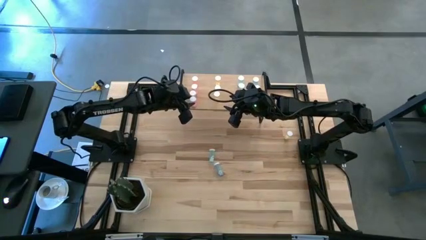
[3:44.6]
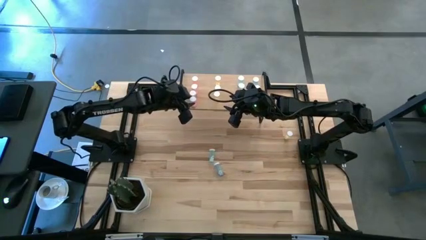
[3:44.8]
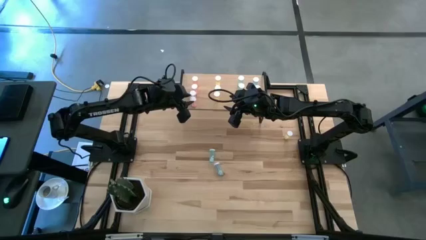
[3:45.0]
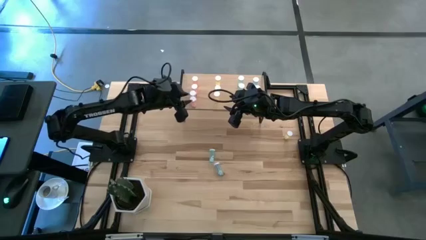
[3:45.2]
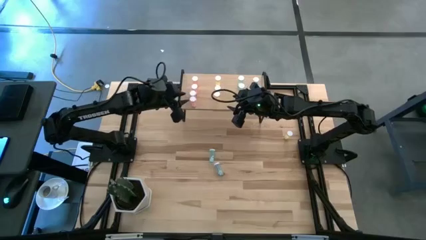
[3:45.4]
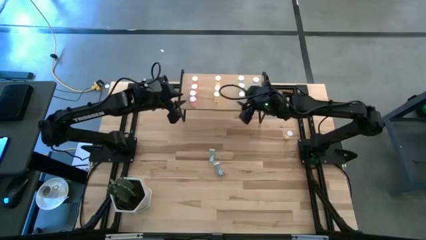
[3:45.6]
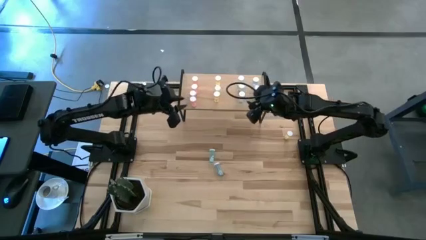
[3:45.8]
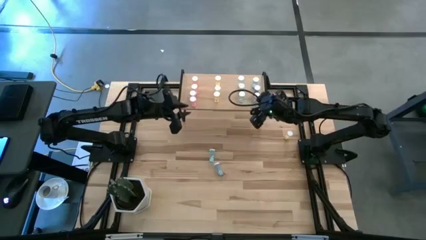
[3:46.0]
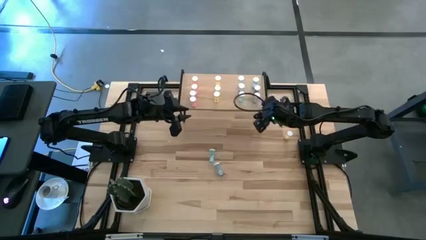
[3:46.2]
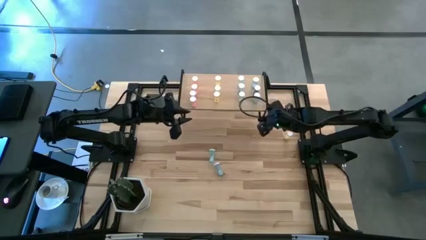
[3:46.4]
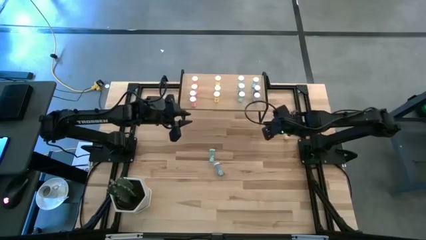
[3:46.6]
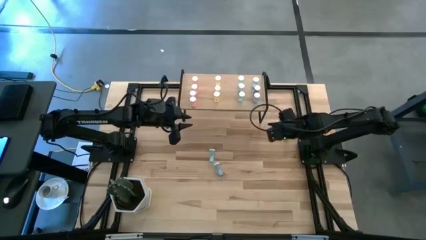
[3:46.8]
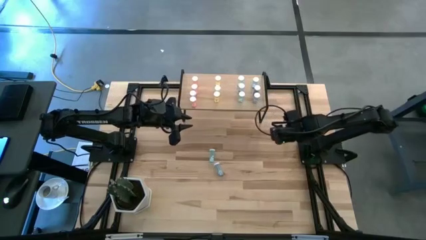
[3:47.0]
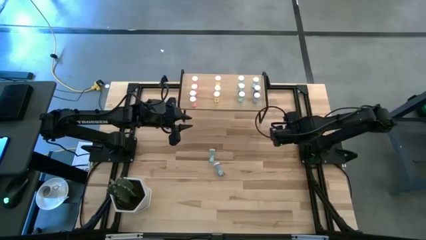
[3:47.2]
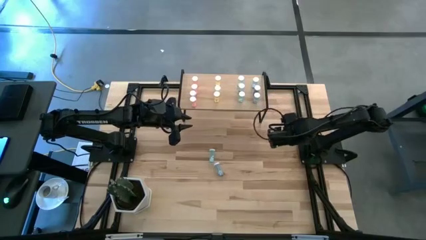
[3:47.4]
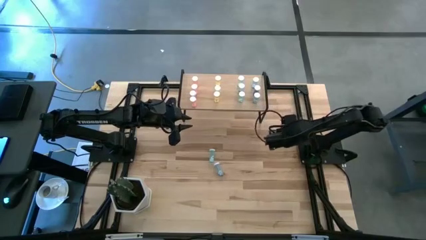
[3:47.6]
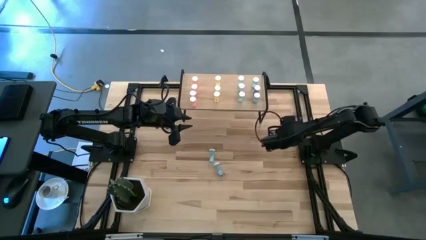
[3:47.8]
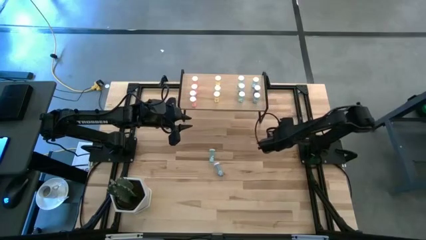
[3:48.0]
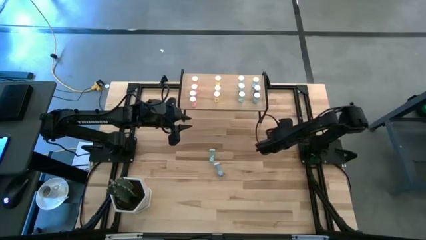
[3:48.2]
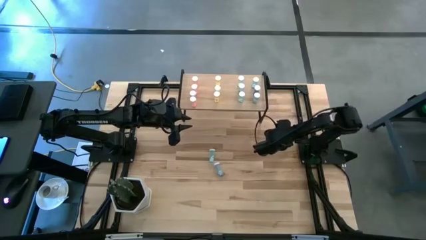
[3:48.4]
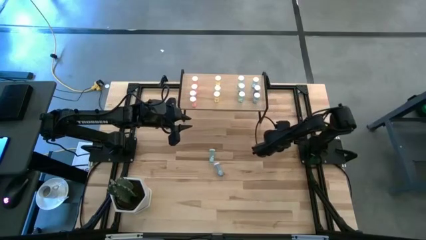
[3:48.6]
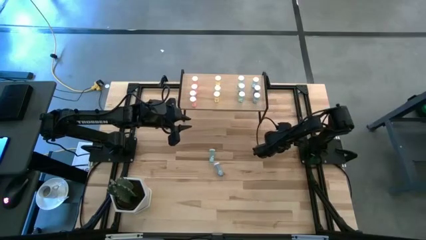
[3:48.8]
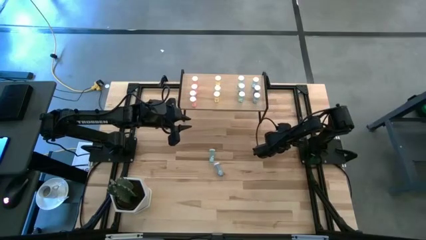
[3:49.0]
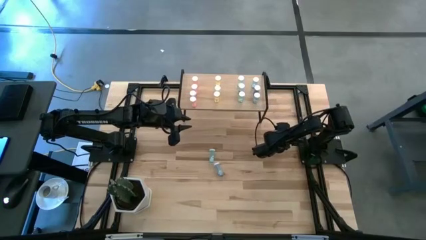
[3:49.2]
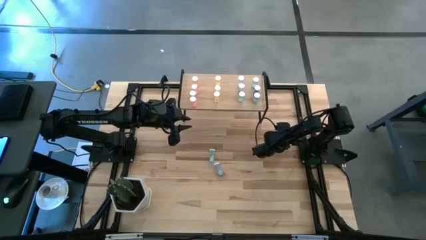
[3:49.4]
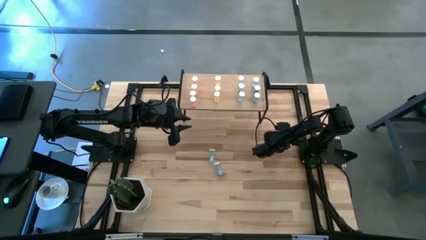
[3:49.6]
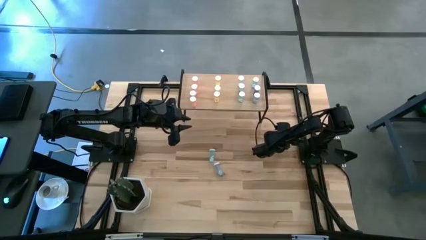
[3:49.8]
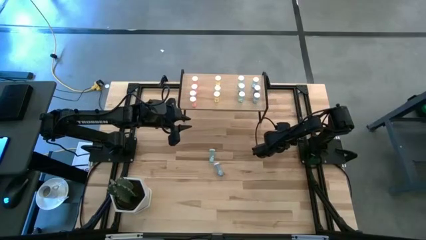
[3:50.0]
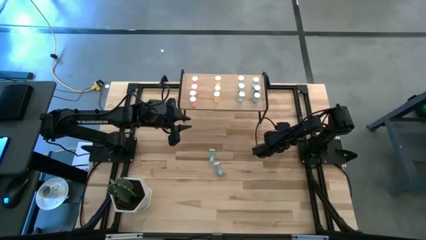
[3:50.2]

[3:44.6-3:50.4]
Task: Pick and place medicine bottles onto shelf by color
Put the yellow pill bottle on the shelf aligned with the other yellow pill bottles

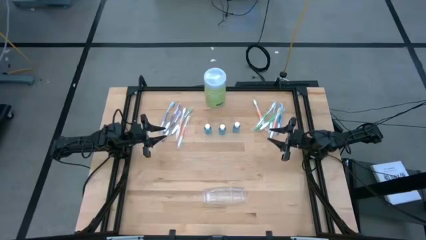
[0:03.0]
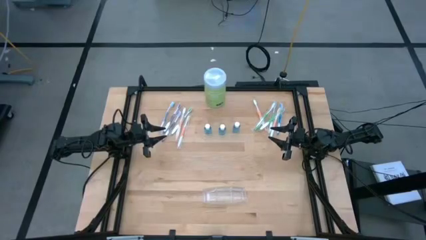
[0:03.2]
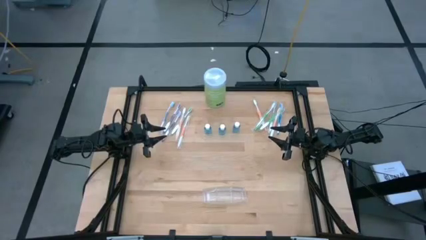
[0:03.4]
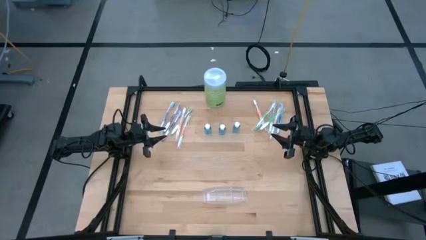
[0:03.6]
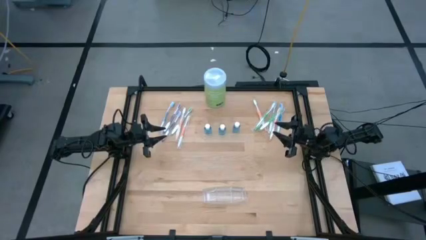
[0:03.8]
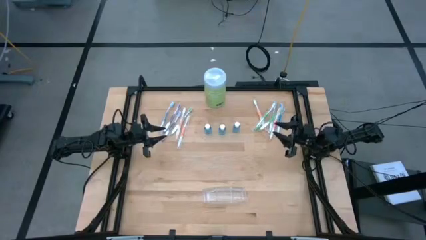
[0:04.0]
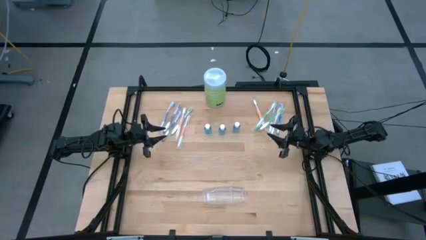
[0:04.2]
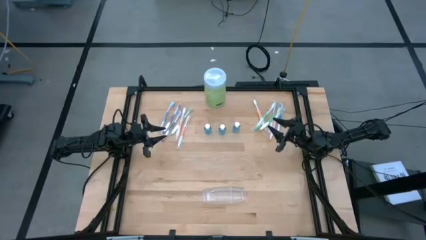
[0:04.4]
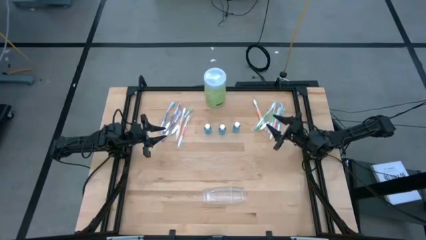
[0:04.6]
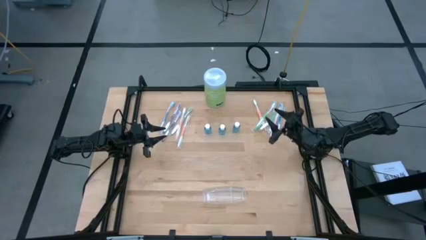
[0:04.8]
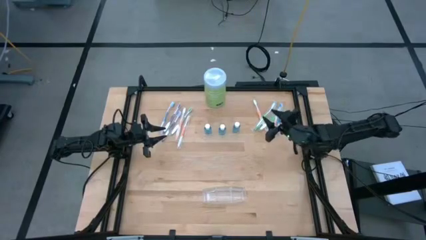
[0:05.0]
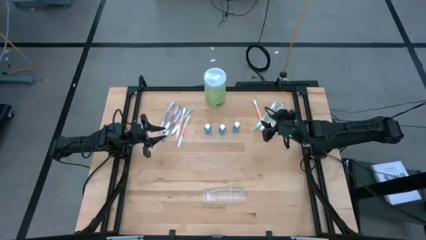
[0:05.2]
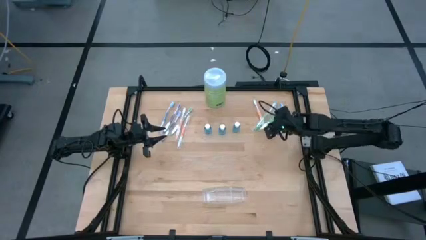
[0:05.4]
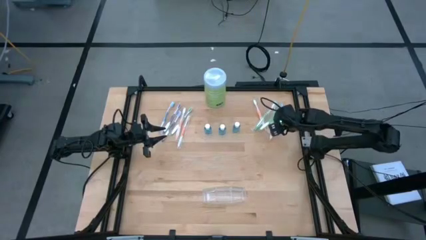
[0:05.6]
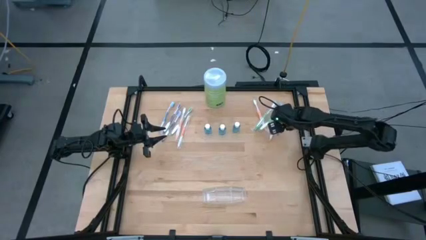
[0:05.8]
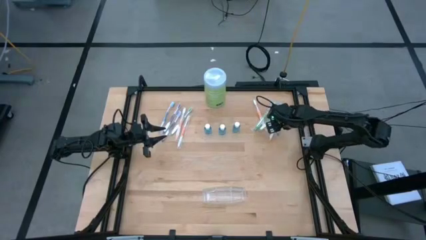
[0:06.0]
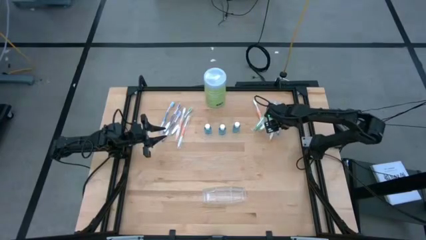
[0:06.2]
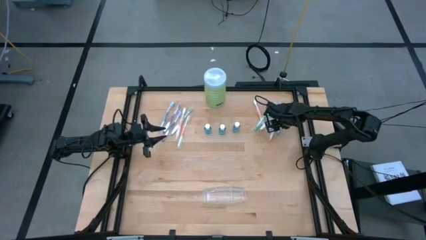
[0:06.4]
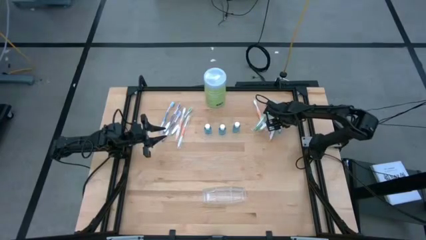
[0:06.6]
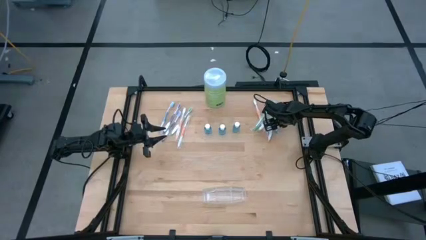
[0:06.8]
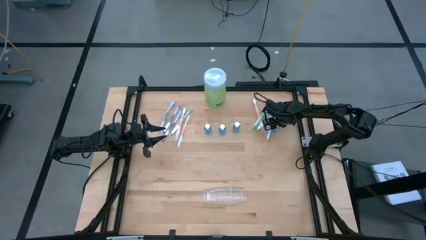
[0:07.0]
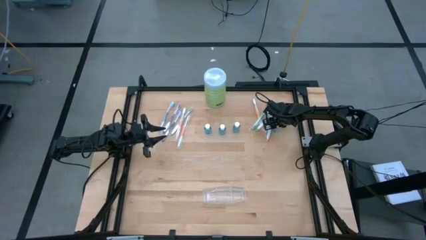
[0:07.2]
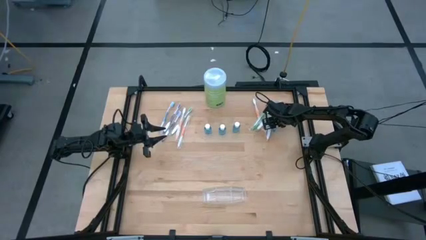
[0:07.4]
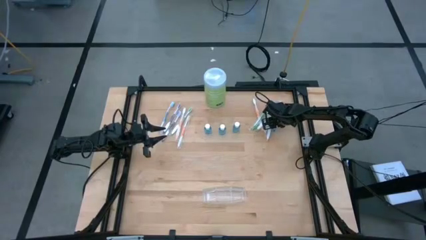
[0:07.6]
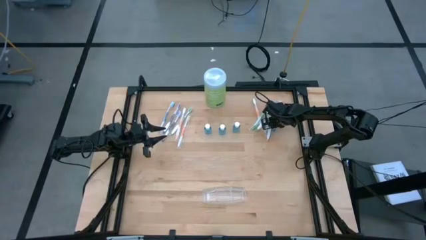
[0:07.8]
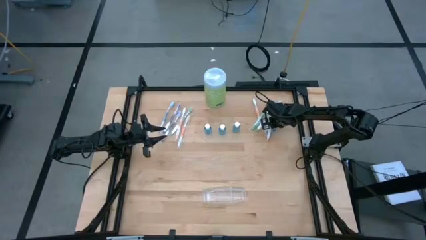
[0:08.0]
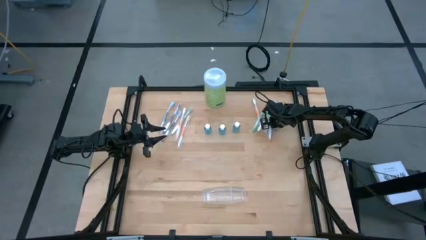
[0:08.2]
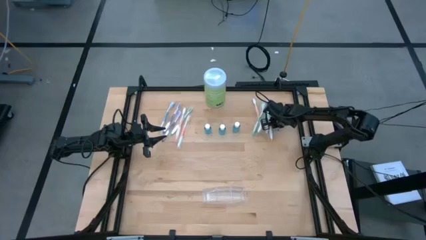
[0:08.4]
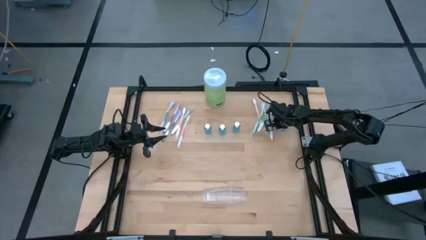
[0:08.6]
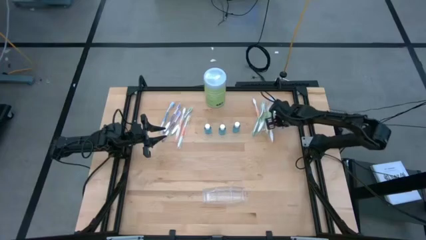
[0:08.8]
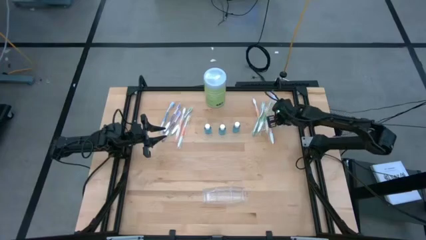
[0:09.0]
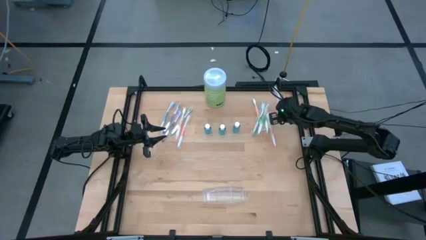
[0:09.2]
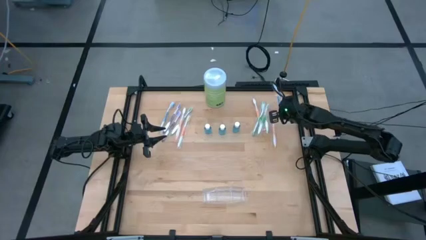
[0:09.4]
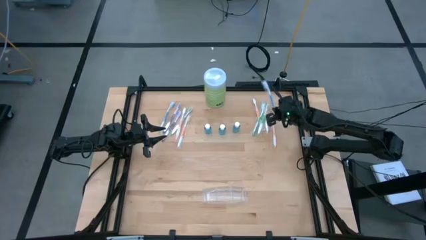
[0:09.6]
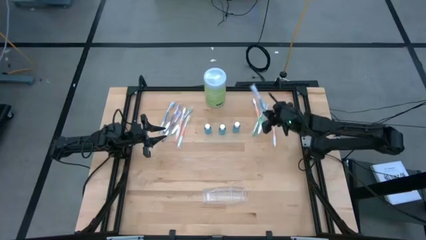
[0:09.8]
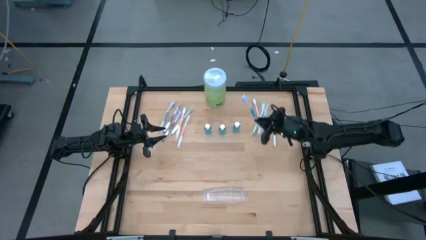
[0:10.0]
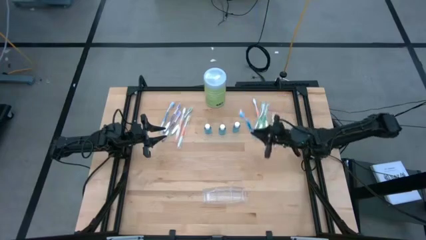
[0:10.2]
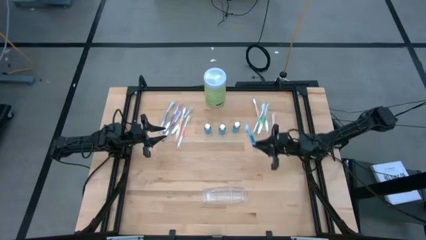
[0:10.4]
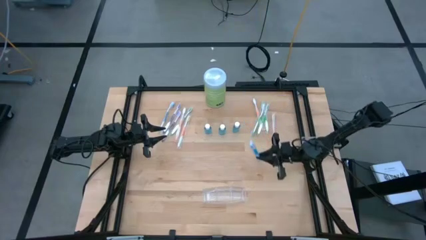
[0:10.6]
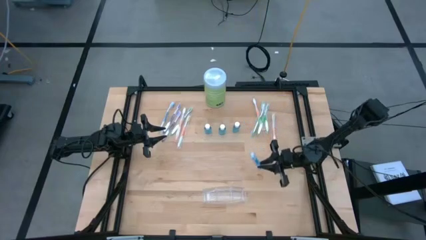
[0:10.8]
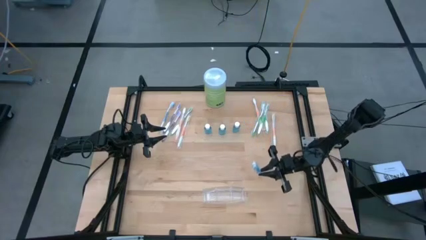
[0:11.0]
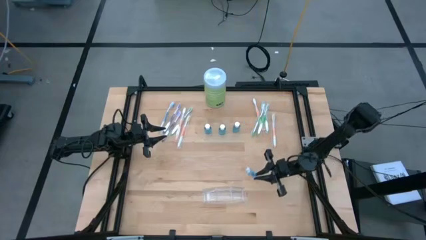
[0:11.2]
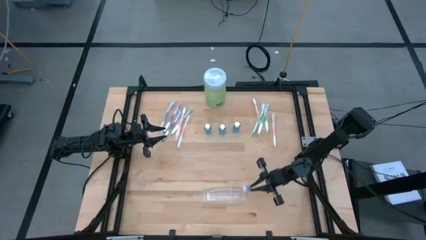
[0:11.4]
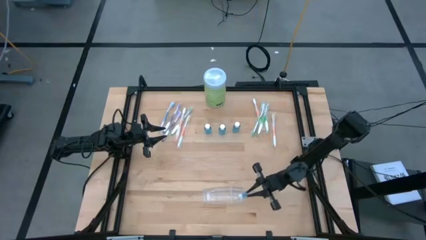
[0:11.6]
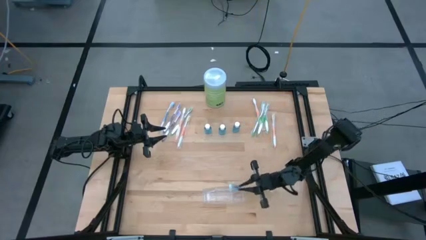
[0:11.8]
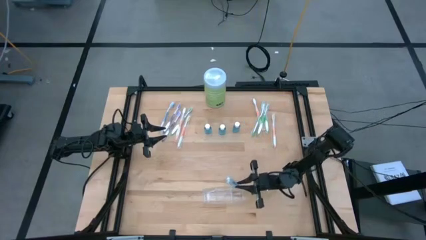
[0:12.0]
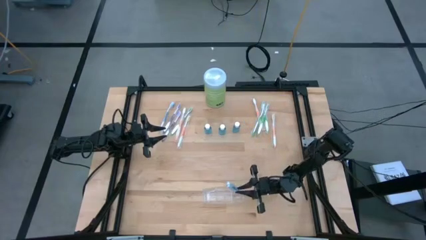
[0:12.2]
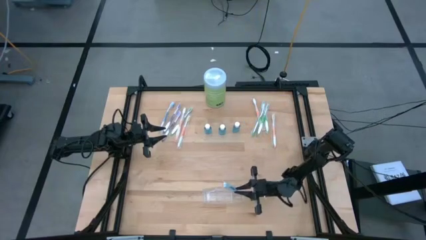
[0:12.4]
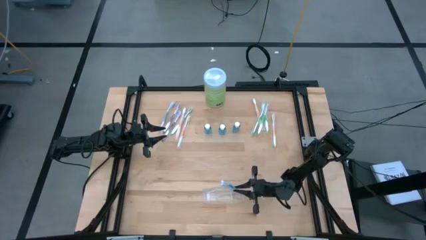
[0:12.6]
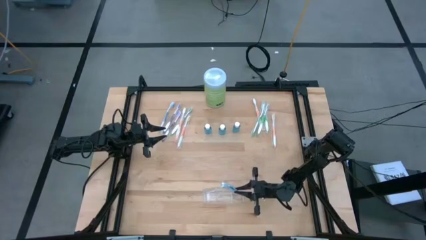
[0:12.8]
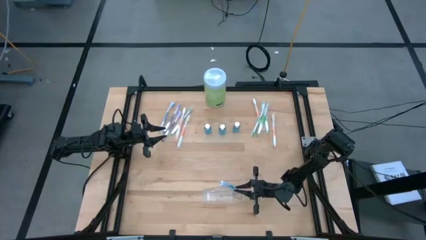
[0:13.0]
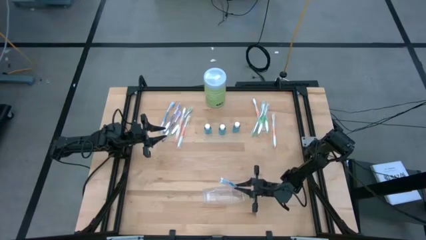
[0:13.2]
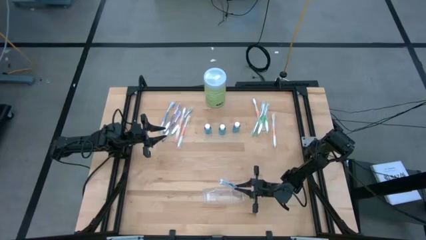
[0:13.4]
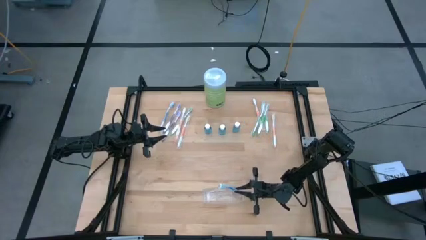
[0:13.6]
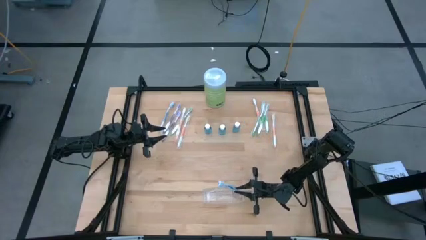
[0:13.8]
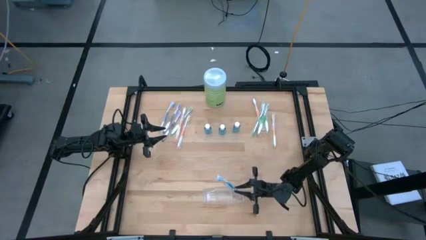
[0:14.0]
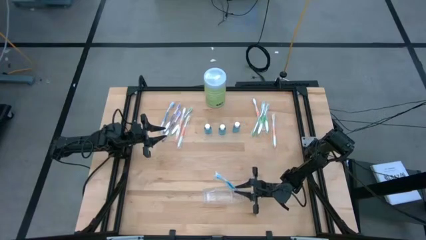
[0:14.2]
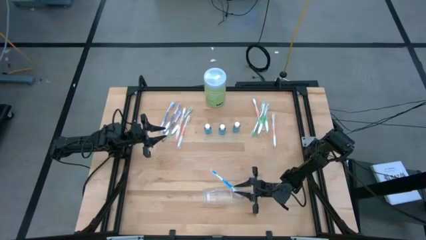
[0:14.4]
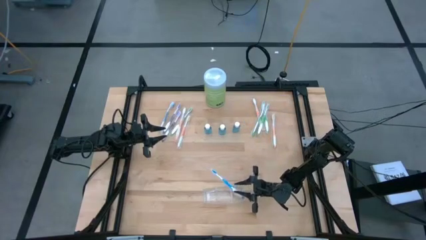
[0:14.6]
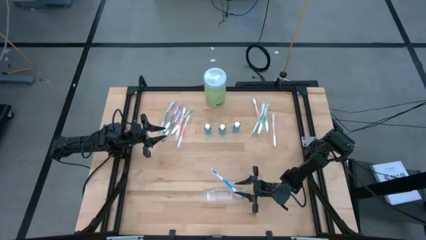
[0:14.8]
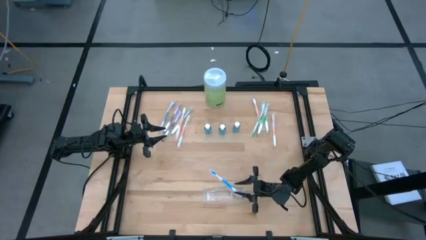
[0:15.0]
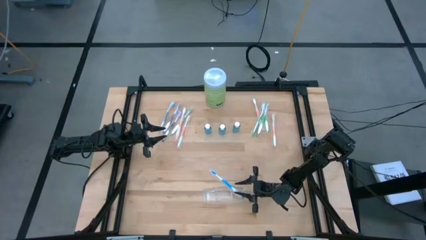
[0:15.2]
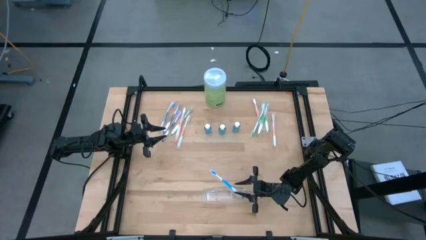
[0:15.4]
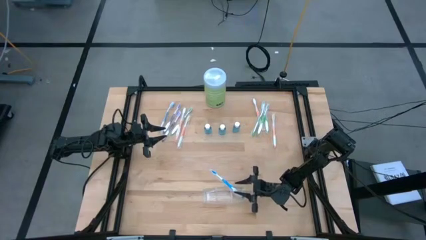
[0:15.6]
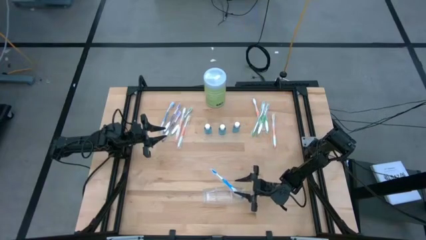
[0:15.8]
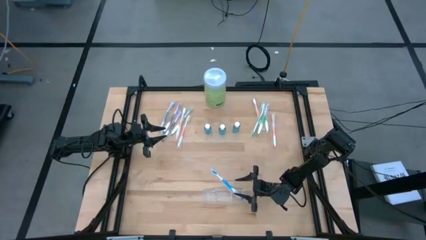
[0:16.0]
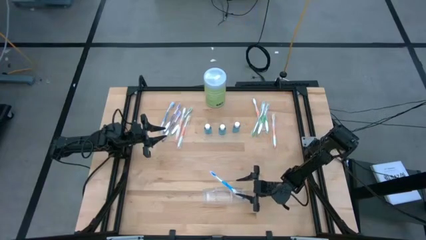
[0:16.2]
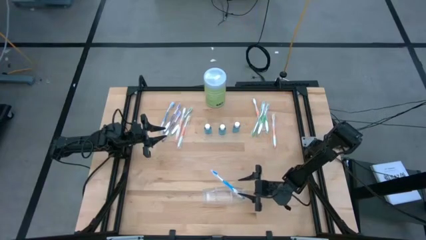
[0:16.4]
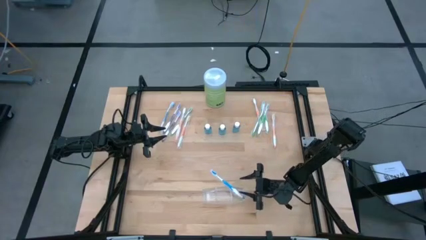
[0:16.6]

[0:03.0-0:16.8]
Task: Pick & Place toothbrushing station
Put the blue toothbrush into the transparent organizer
